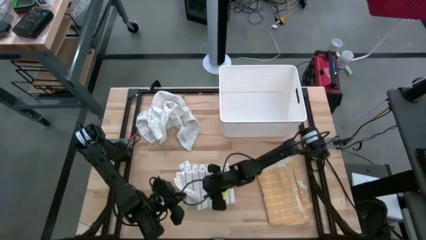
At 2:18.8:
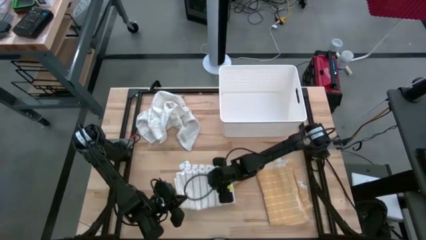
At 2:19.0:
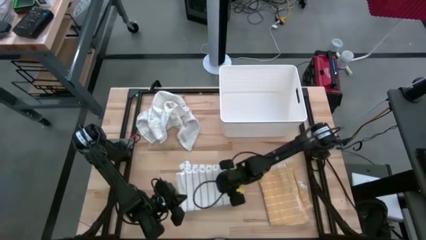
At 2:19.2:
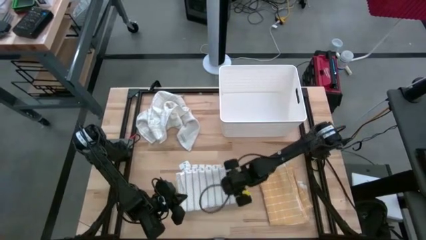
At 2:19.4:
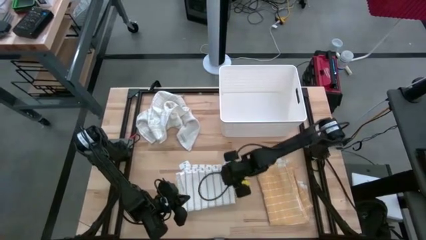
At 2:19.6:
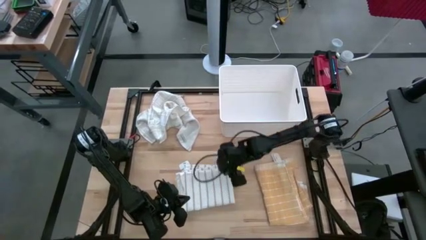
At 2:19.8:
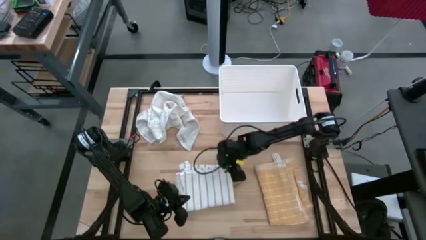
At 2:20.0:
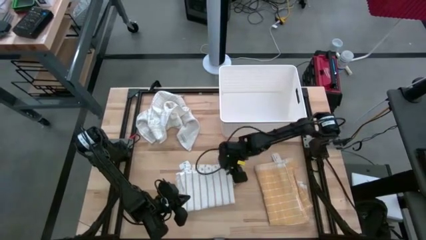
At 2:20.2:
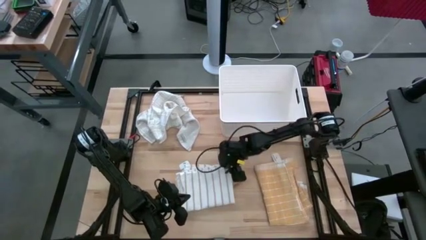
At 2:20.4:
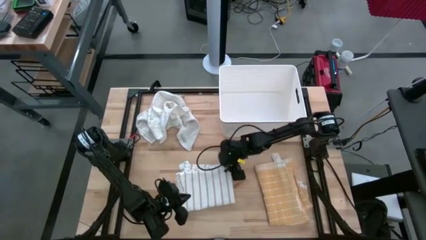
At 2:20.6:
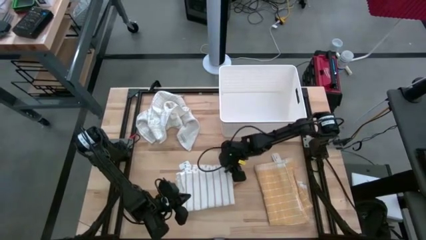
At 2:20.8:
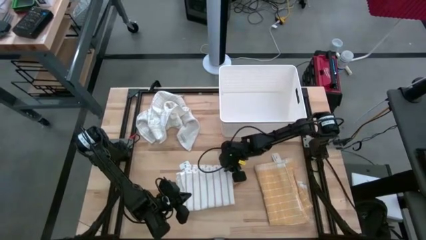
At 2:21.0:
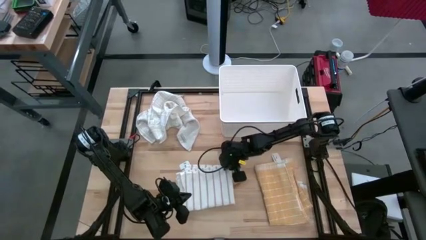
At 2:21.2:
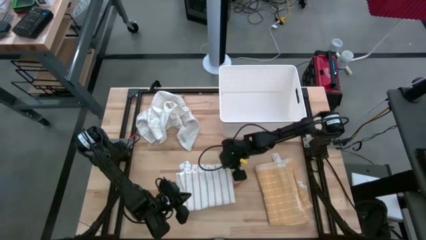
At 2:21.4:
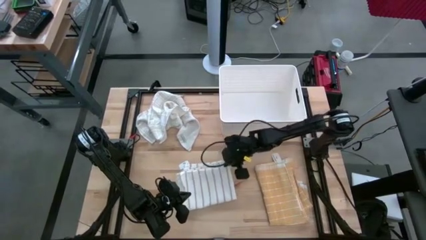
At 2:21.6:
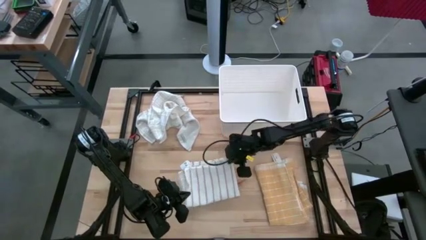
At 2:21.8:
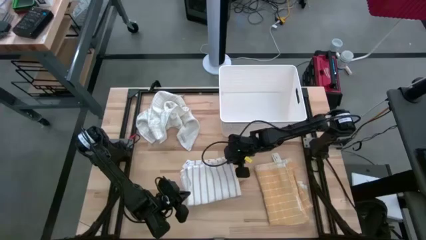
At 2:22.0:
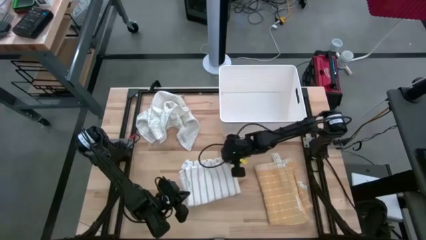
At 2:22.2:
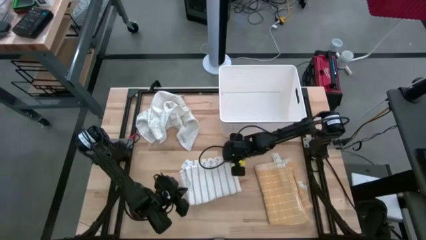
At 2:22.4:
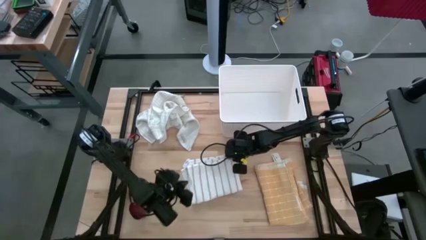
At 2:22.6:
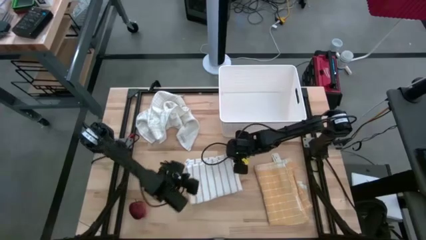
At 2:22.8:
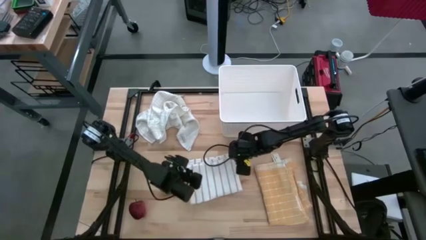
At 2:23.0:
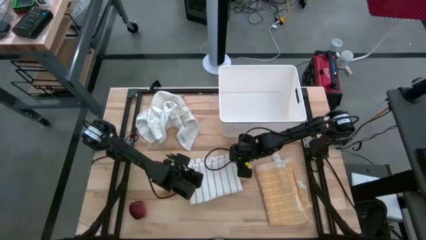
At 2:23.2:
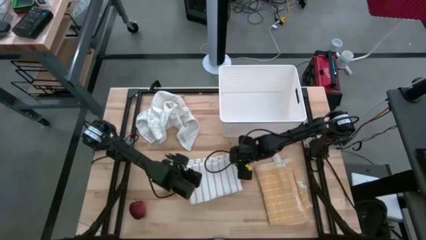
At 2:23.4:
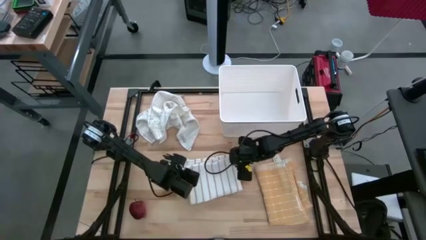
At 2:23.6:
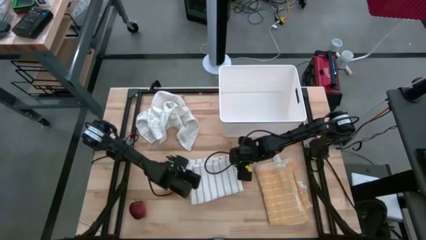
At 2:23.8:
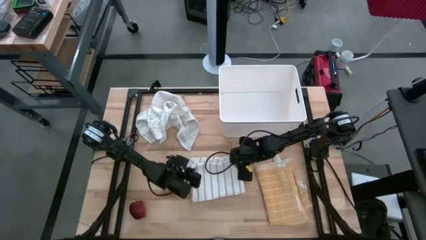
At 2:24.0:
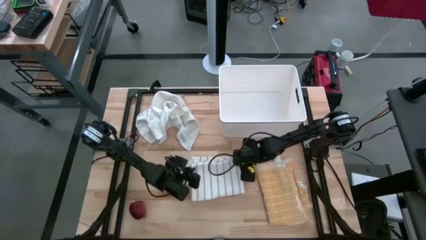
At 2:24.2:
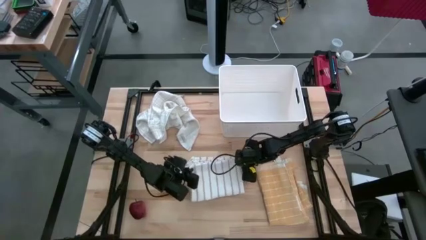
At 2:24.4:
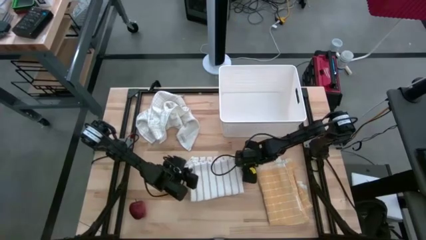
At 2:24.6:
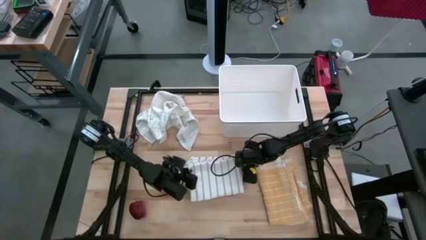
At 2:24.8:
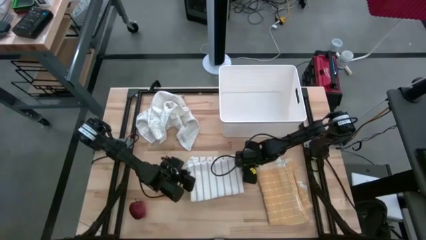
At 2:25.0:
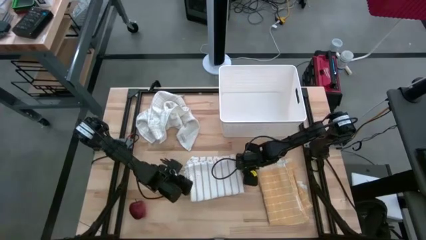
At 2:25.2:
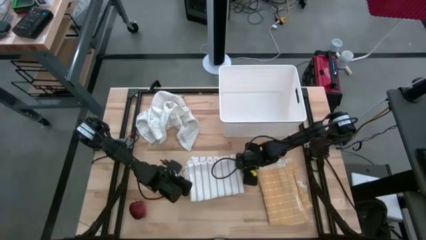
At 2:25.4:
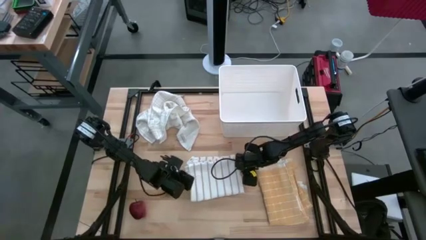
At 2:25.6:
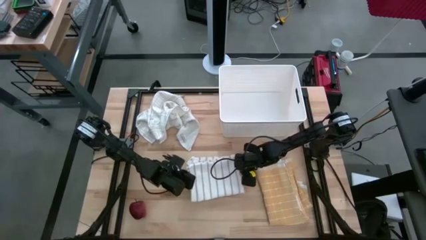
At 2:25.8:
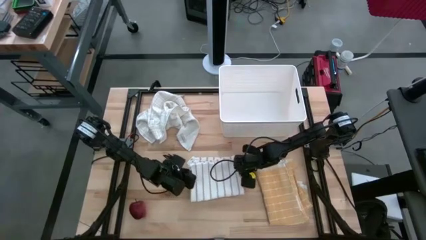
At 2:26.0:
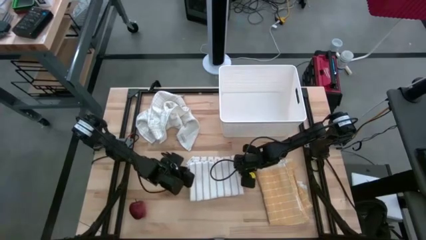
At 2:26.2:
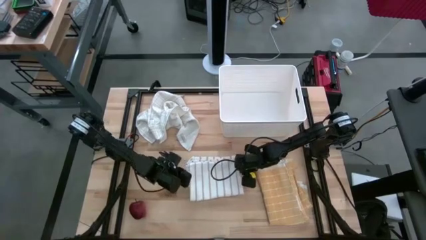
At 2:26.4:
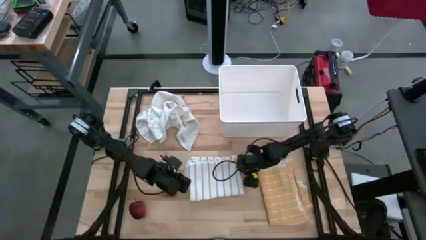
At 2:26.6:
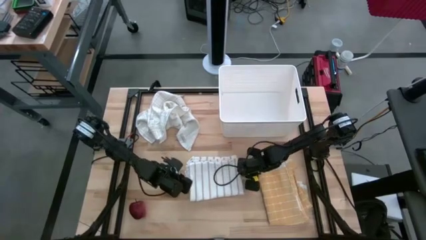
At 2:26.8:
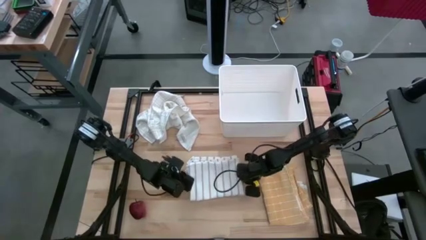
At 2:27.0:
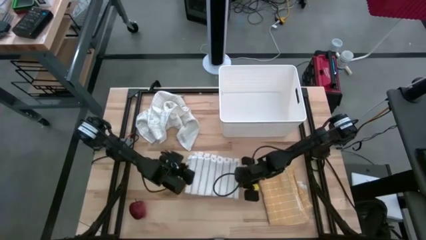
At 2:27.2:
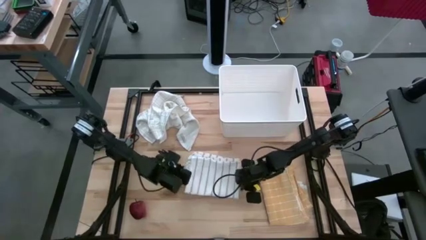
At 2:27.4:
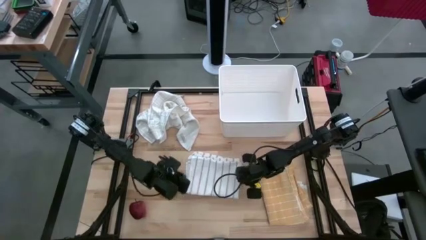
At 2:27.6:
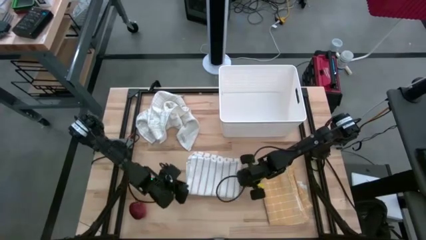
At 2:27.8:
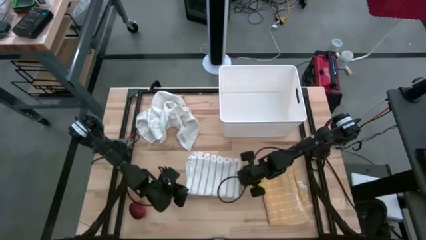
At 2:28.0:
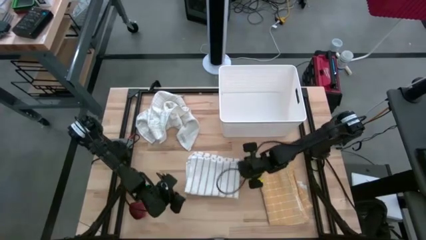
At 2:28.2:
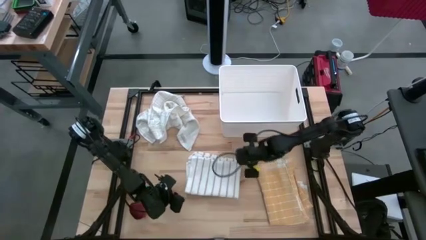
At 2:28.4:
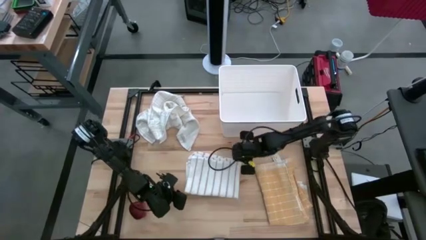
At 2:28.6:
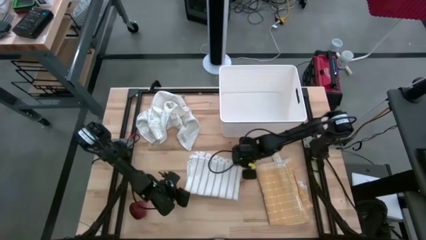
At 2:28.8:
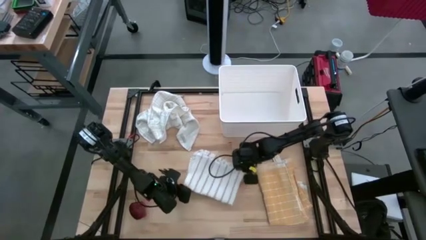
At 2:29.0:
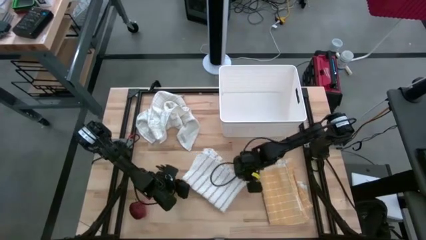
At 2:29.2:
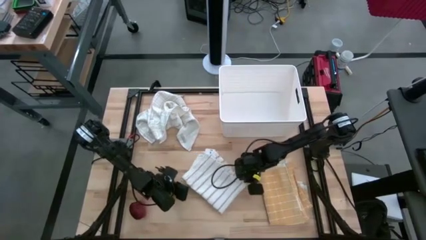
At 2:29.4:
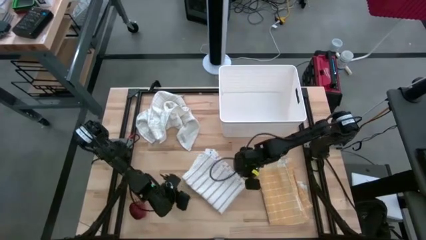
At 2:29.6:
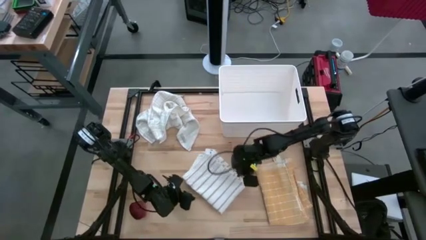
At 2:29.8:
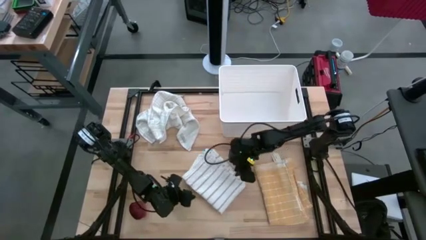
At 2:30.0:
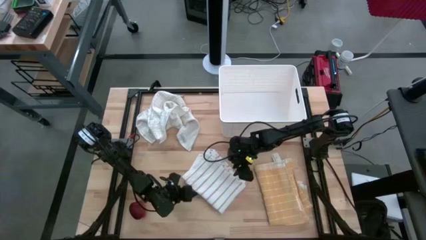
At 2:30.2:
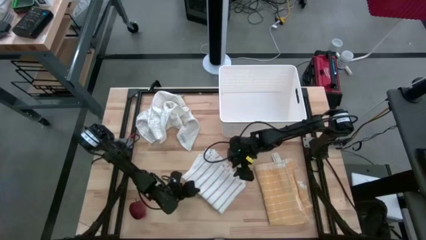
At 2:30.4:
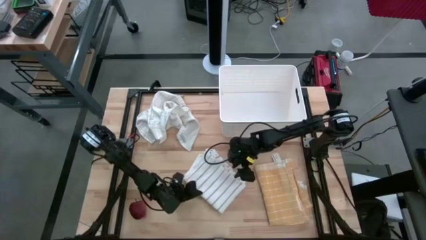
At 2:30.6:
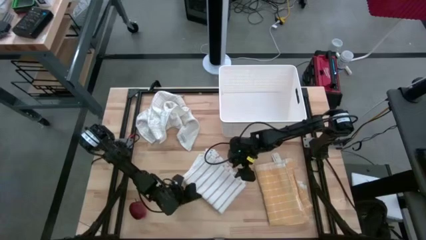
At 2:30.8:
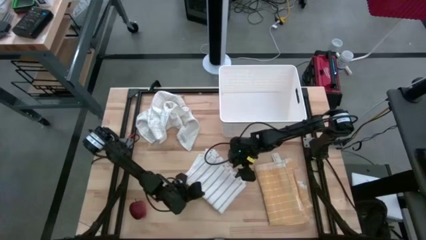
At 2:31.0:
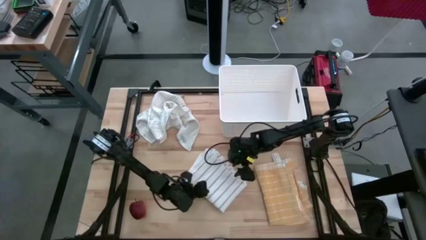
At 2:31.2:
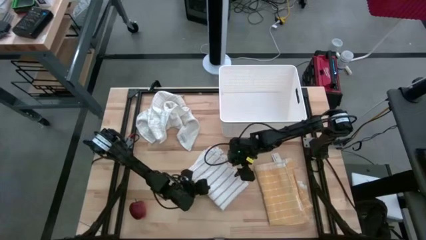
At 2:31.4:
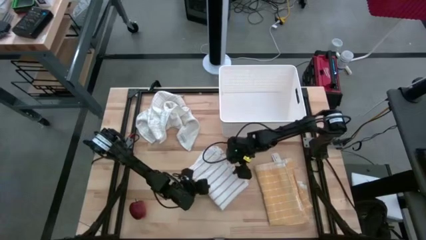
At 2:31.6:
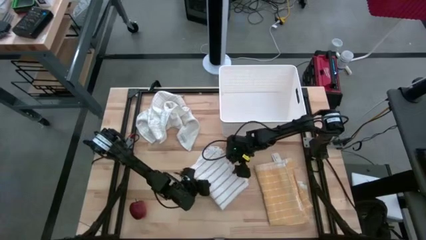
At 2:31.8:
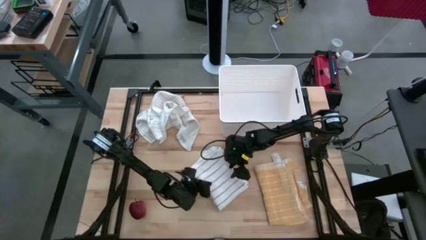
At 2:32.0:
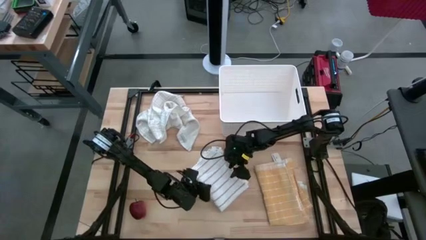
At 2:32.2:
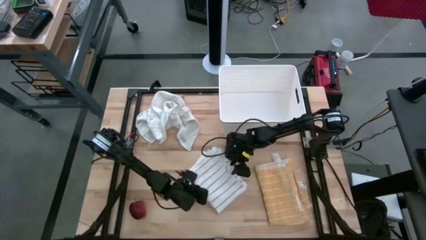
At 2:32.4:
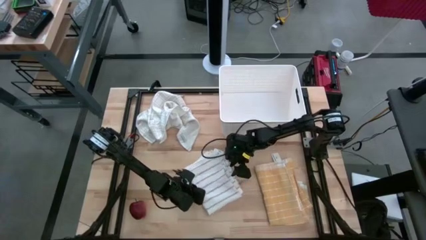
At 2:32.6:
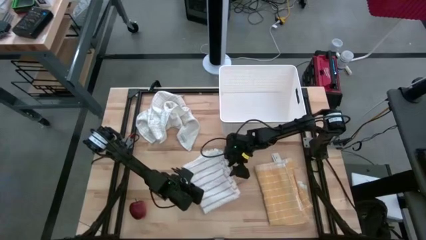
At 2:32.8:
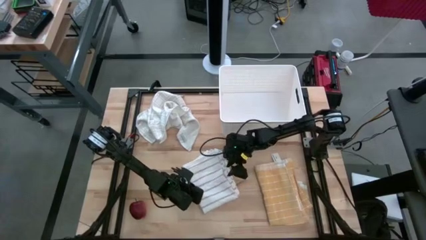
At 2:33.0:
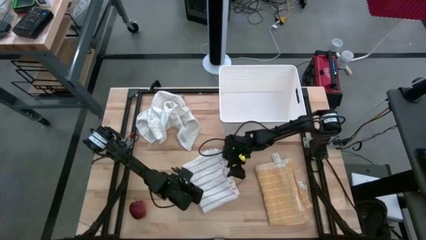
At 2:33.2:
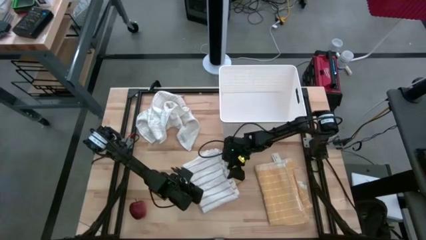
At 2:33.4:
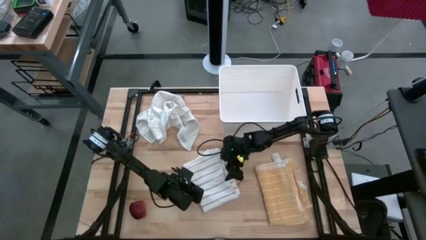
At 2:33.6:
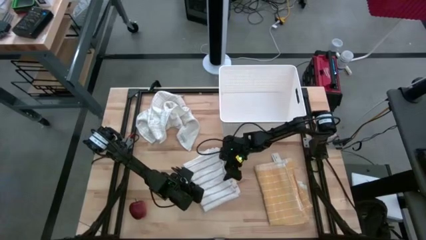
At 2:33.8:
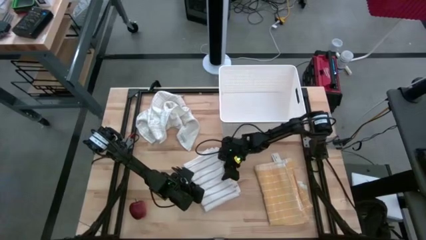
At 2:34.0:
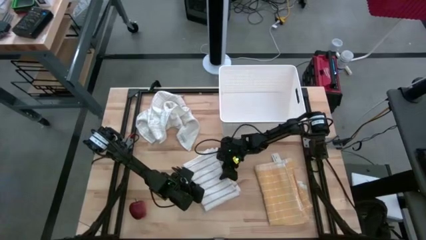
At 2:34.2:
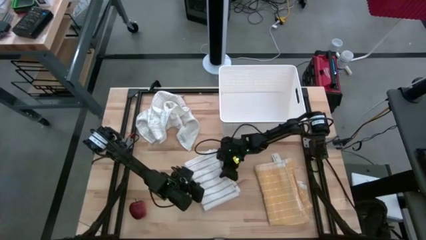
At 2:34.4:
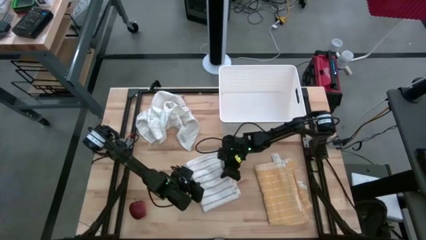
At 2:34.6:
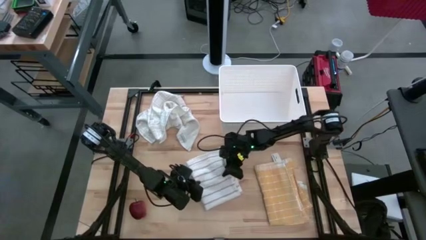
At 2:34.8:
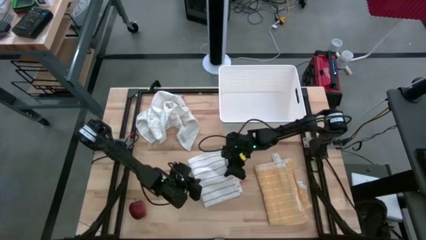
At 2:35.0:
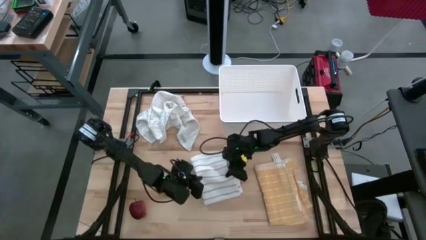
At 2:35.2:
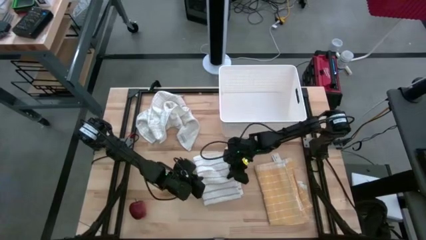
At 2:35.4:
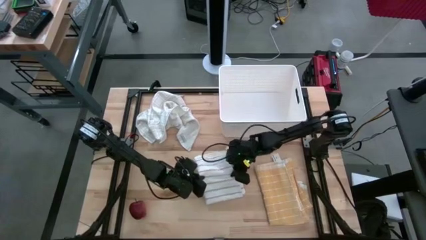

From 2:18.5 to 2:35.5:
Task: Fold towel
Fold the white striped towel

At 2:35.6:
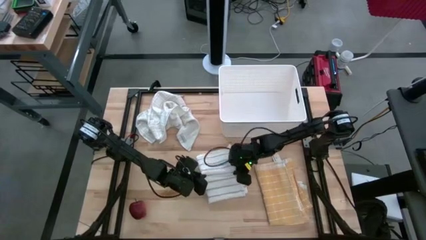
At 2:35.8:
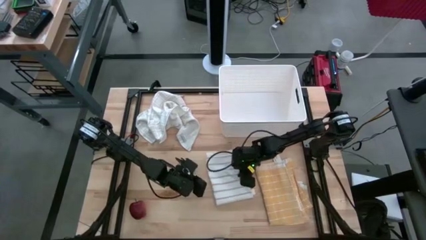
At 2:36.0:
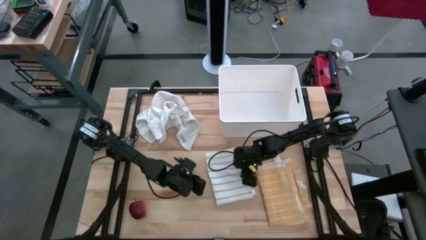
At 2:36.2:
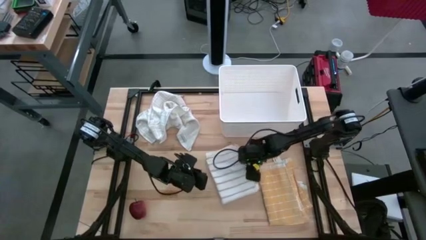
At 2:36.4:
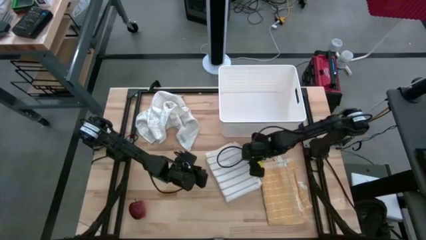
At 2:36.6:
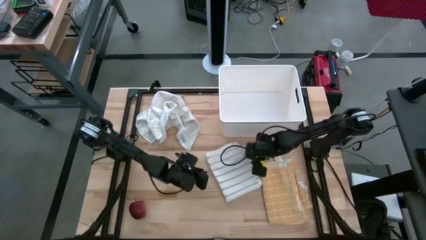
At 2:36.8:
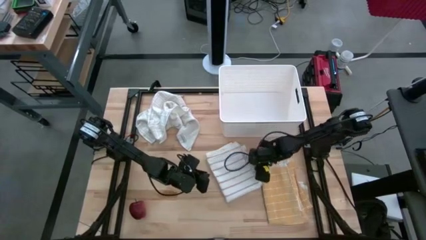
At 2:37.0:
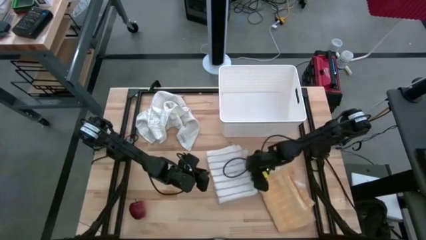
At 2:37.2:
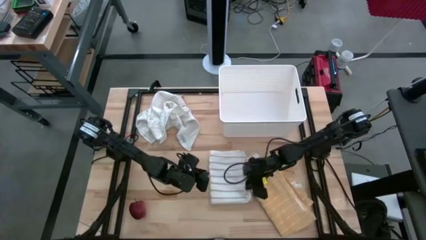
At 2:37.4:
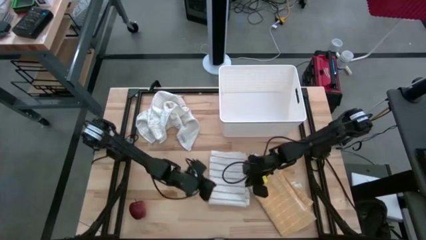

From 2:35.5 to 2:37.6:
Fold the white striped towel
